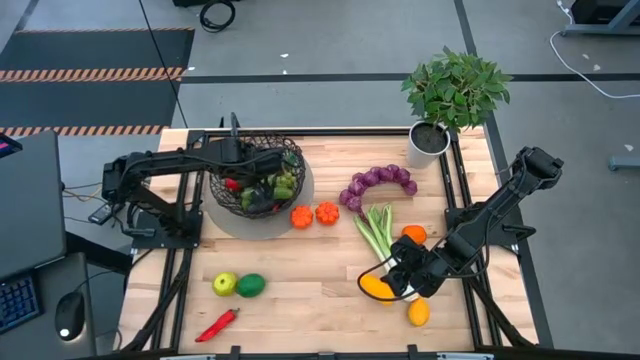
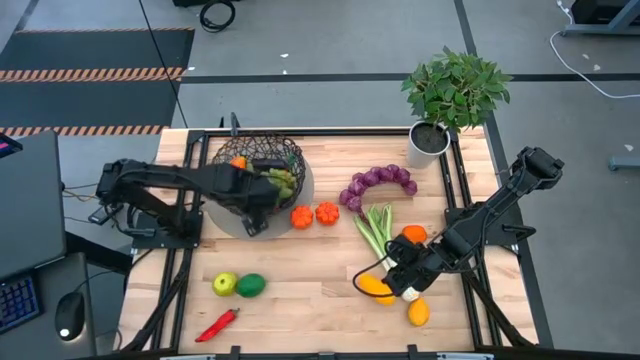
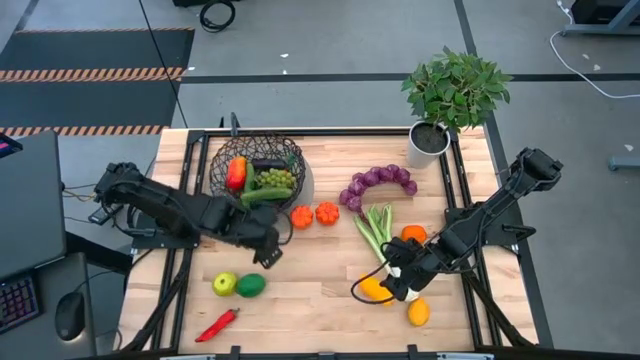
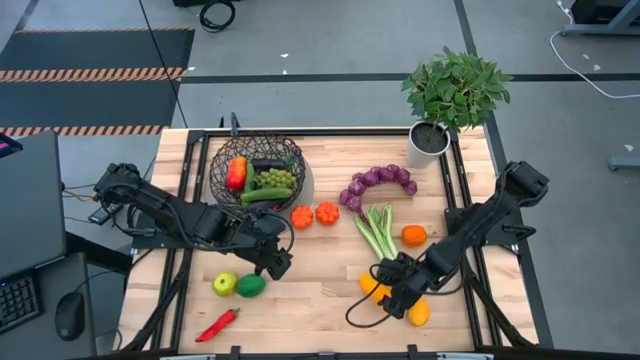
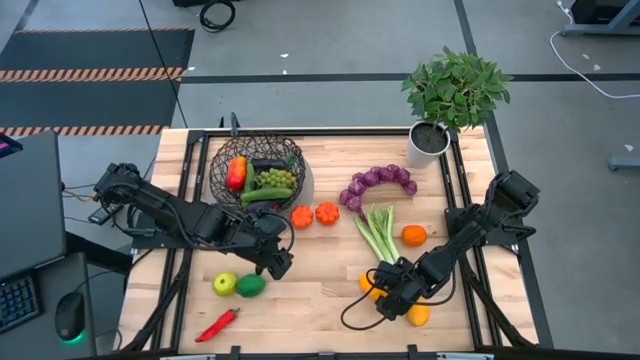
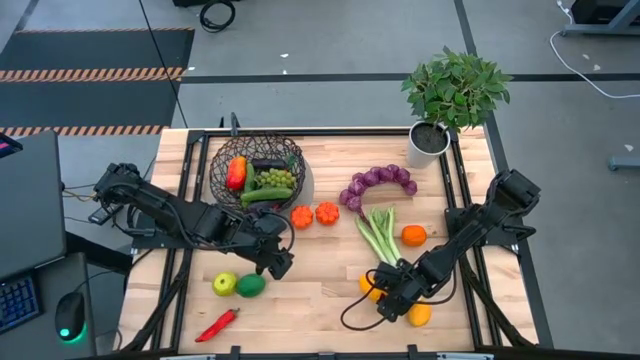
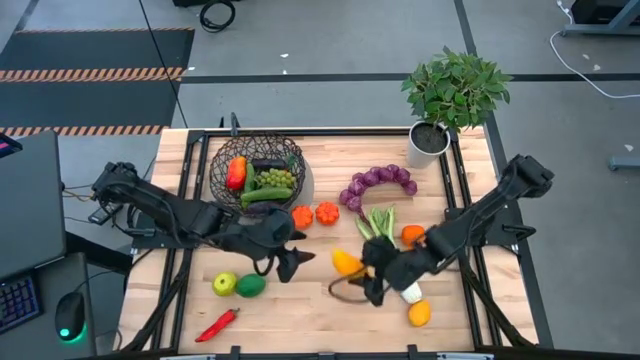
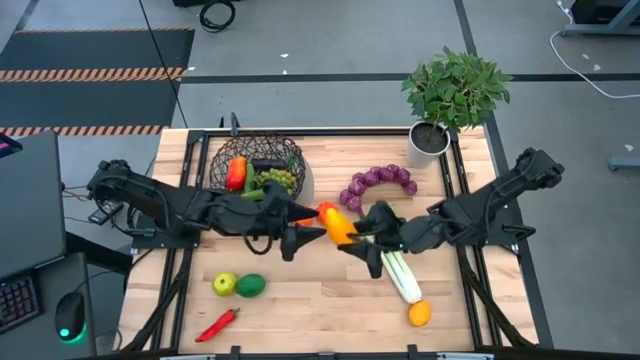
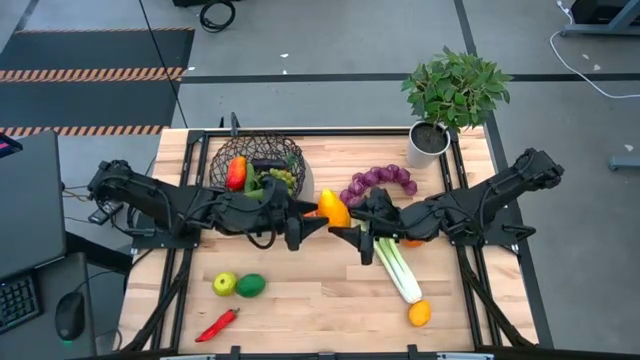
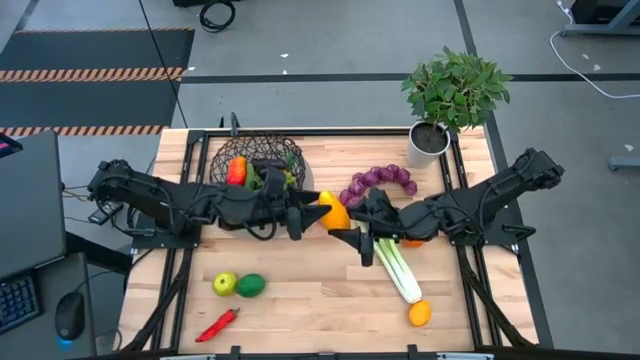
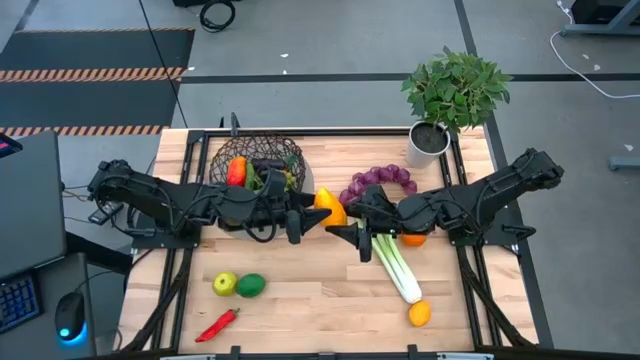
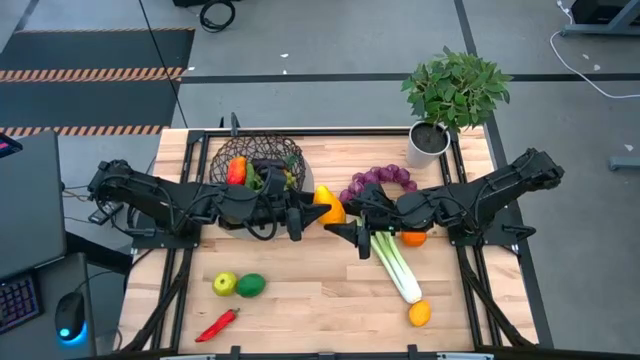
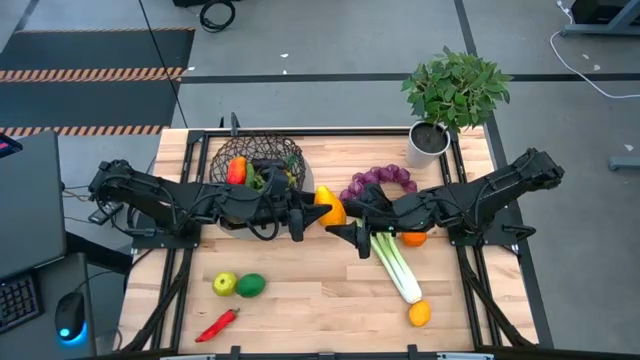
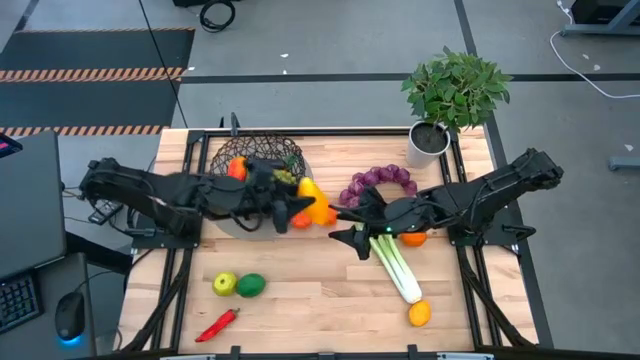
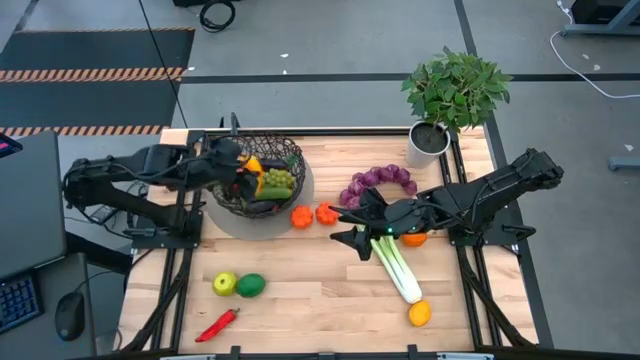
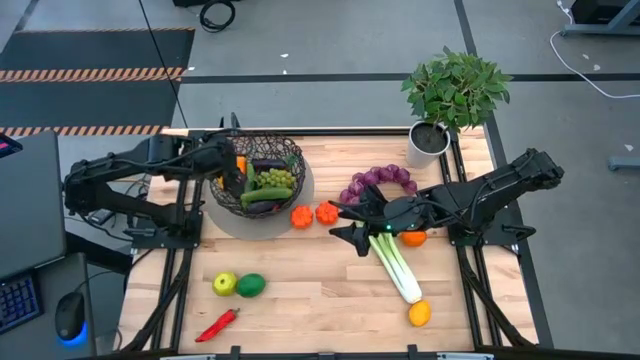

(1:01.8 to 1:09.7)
Task: Build produce basket
Put the yellow mango into the black wire basket

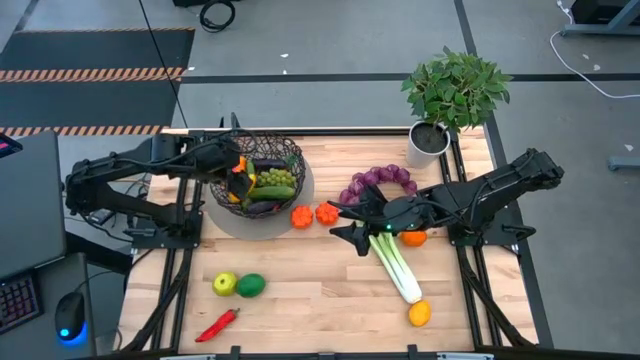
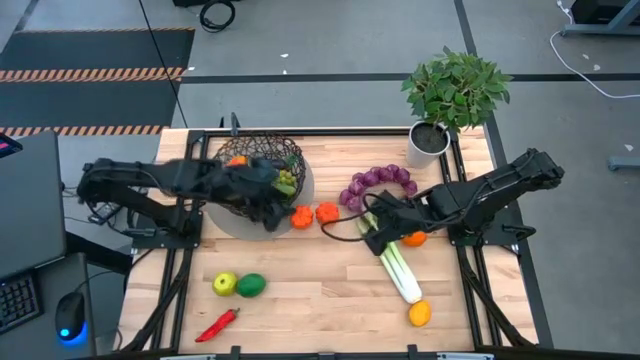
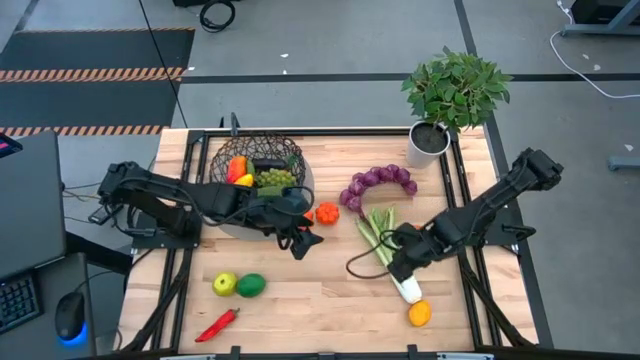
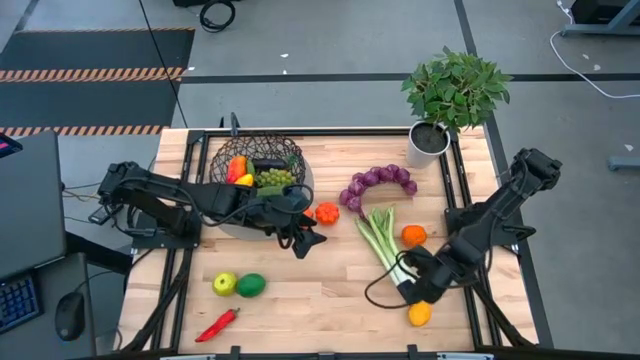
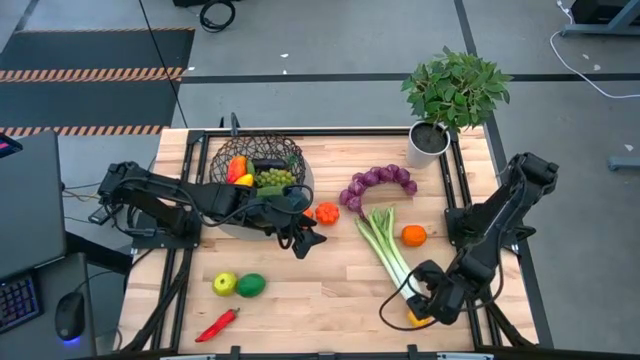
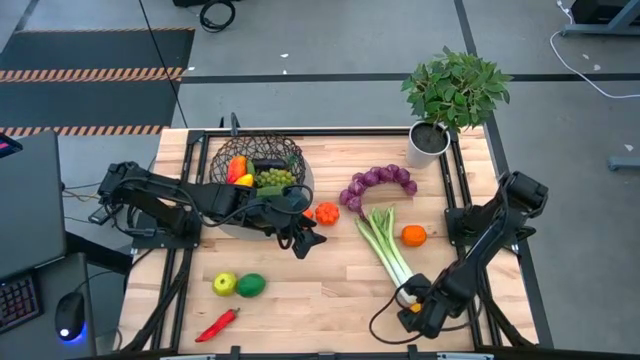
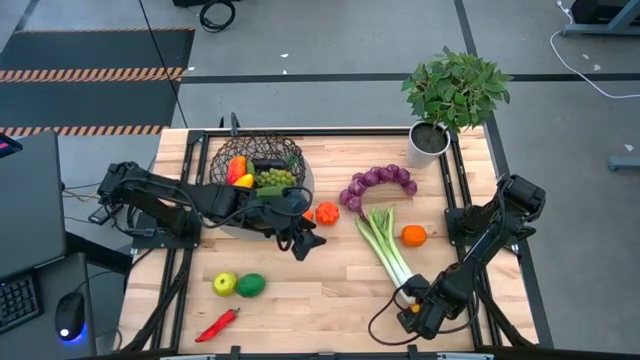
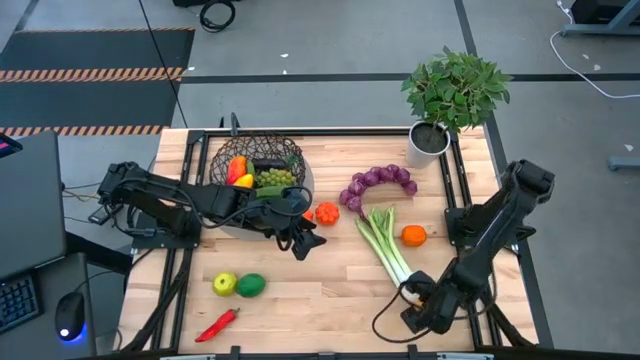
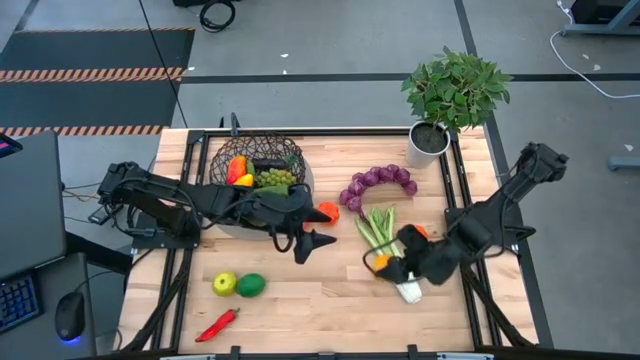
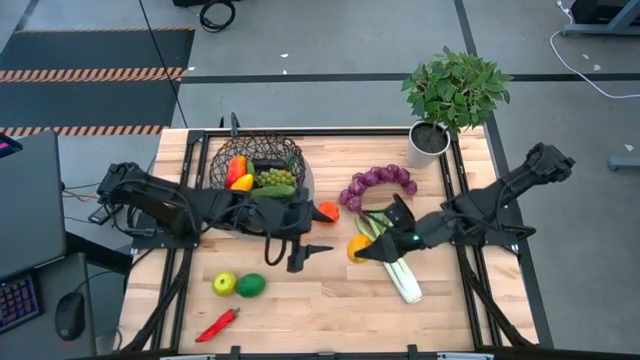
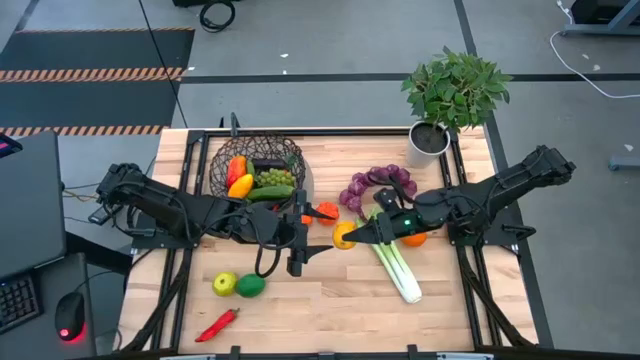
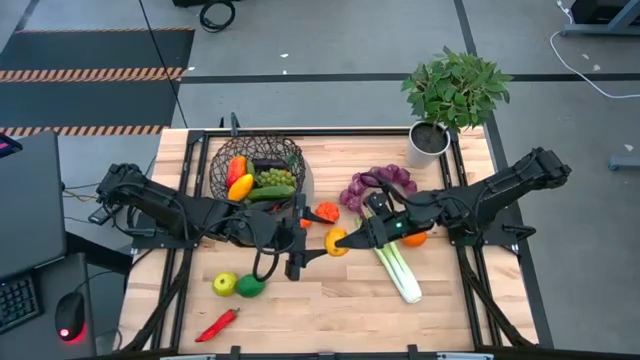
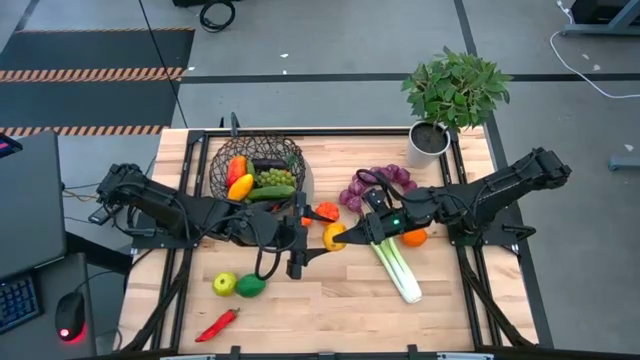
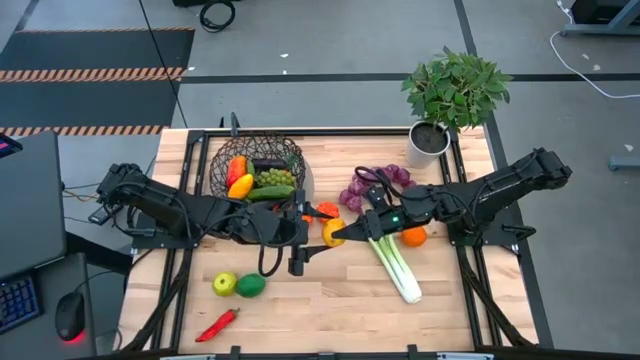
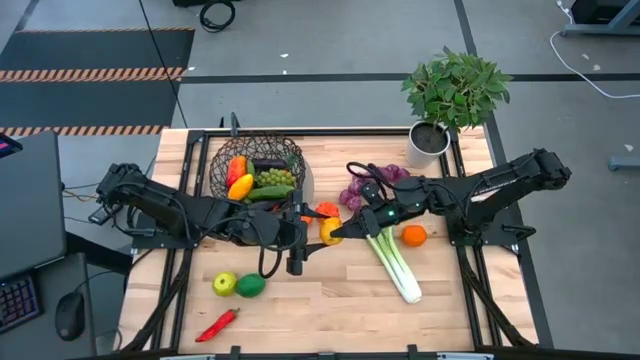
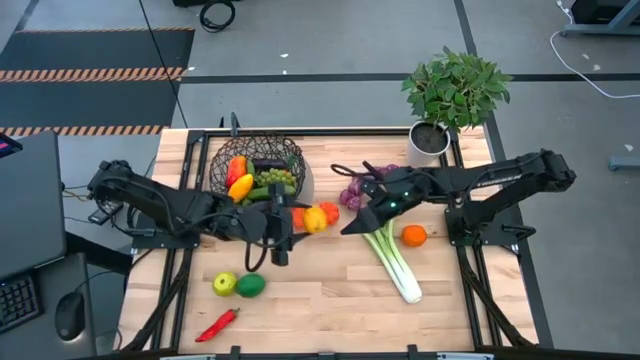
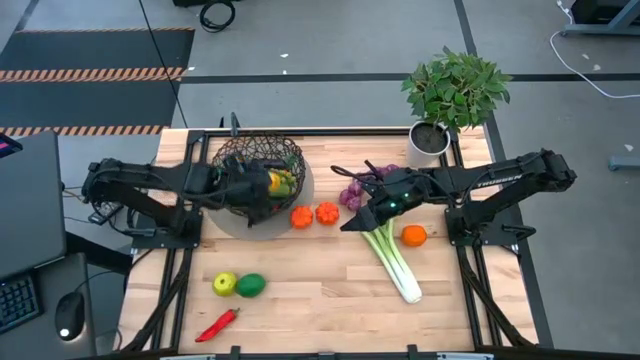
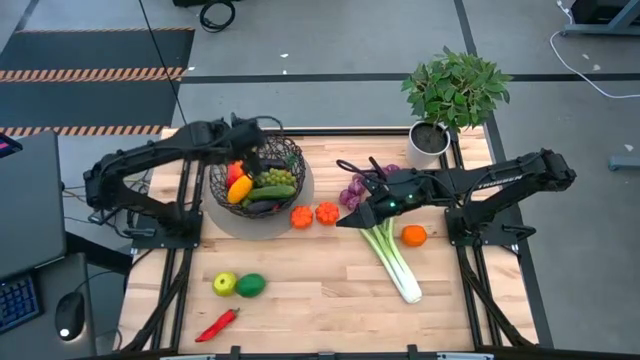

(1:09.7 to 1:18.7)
Put the yellow lemon into the black wire basket

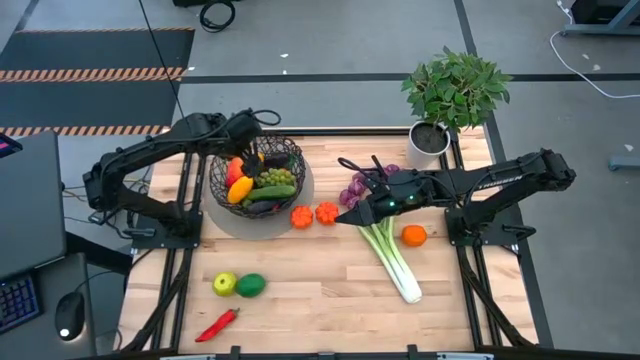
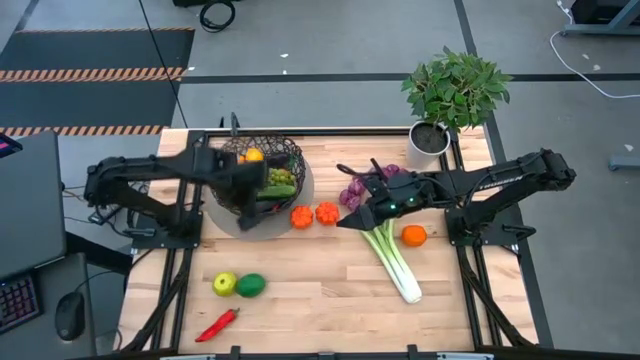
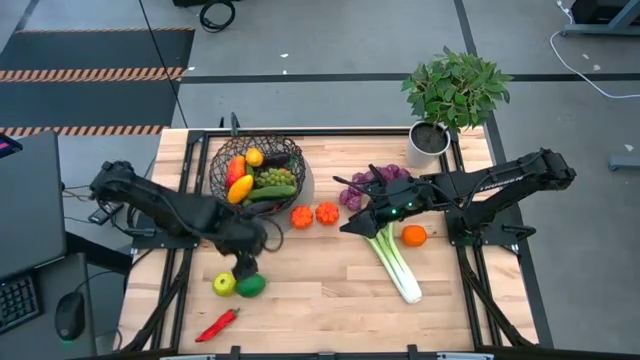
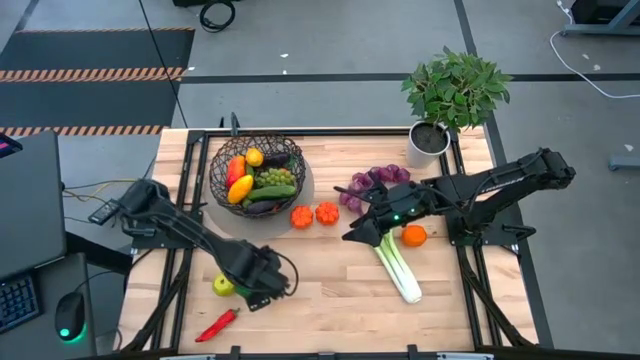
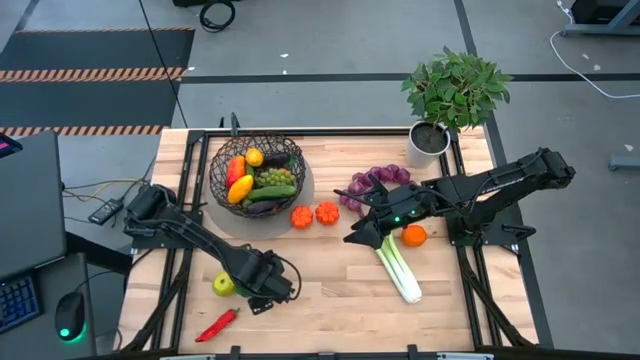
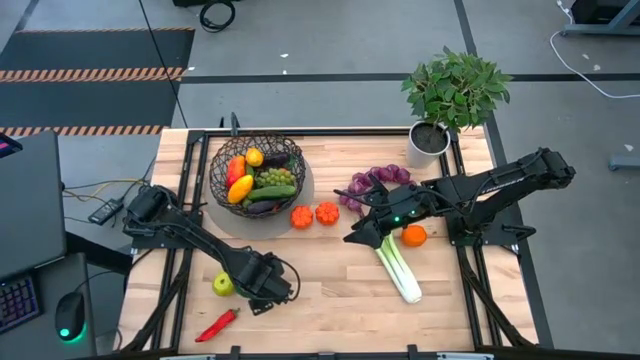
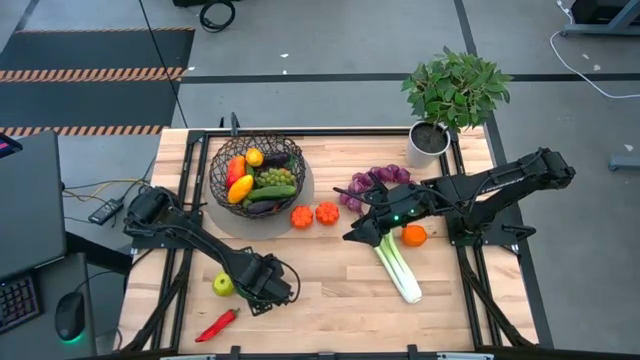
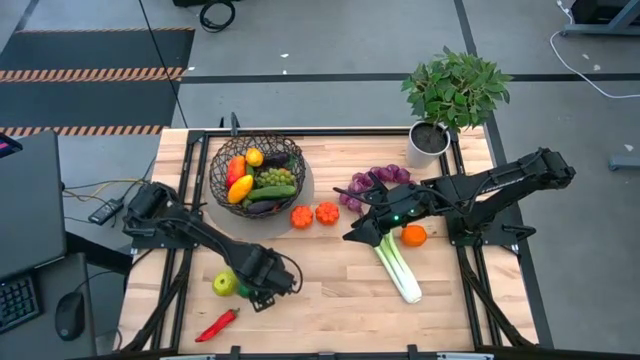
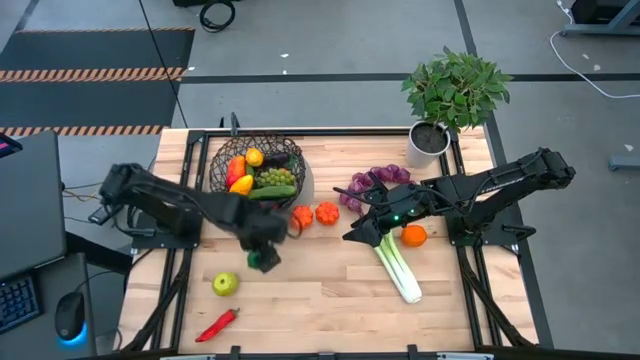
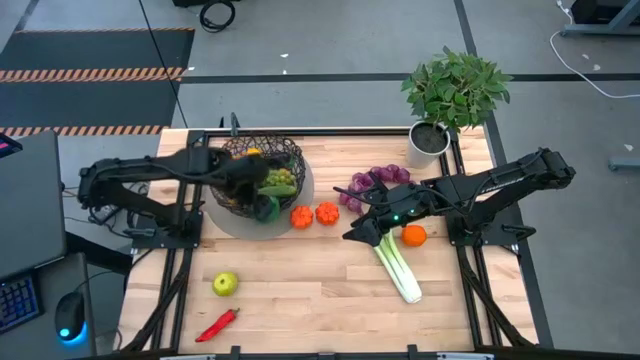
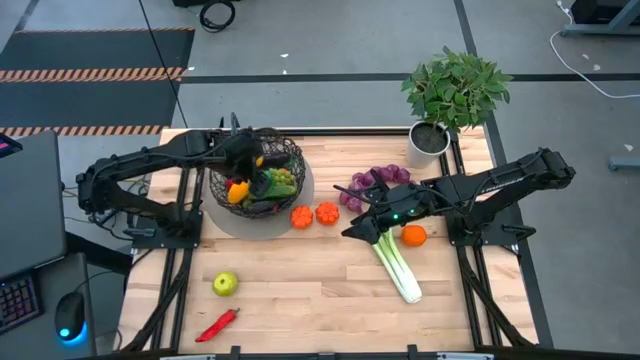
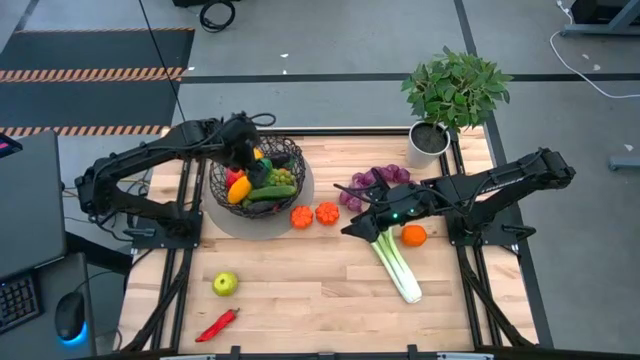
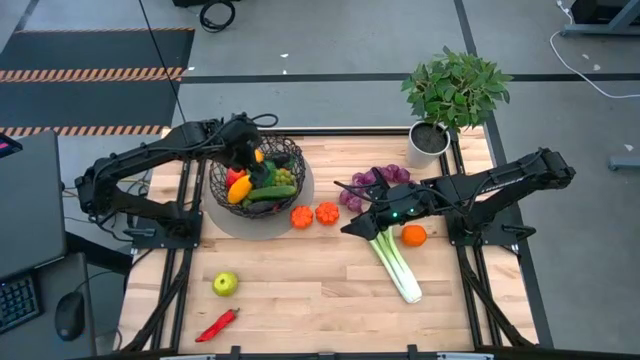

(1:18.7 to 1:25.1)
Put the green lime into the black wire basket
